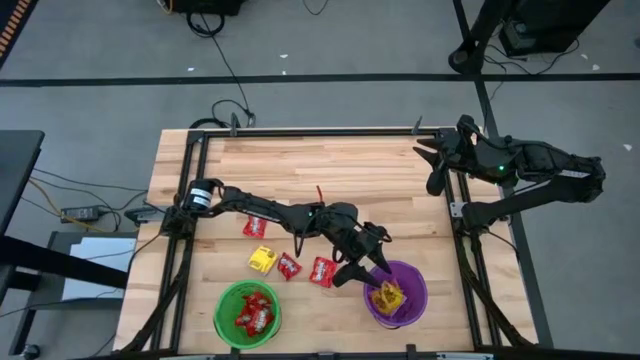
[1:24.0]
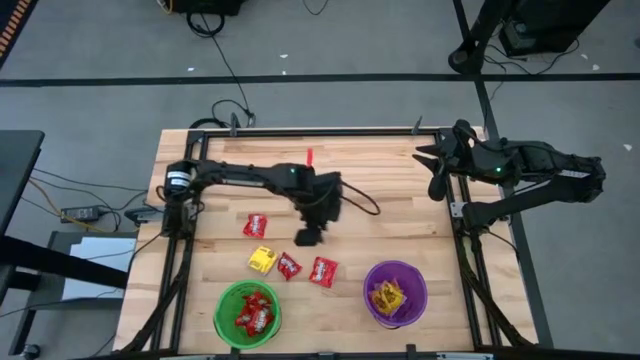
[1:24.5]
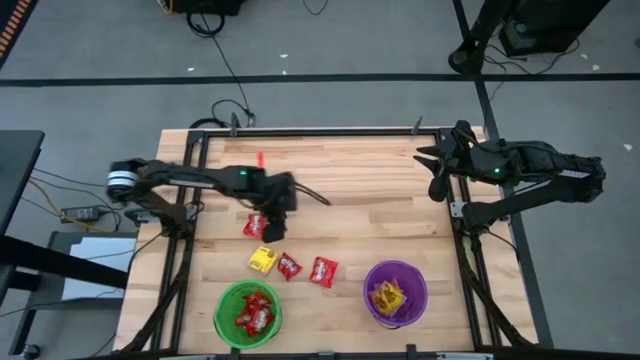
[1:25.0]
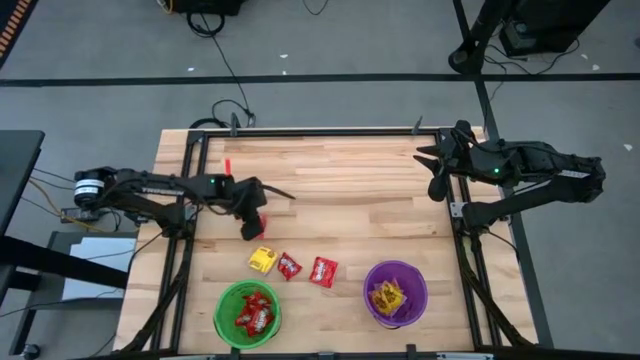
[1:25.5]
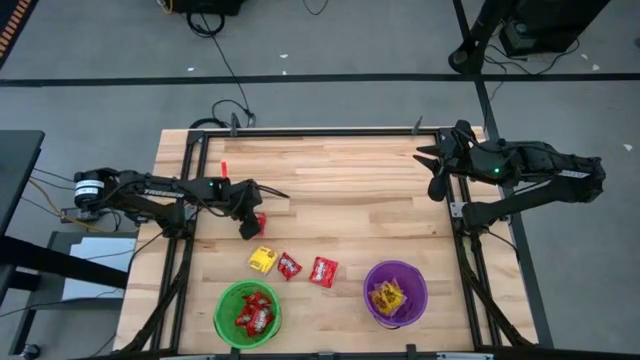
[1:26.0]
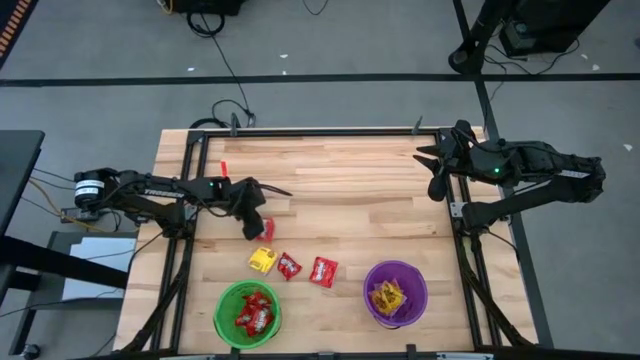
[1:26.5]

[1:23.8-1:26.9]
Task: Sort candy by brand, put in halloween buckets
Put the red candy into the green bucket

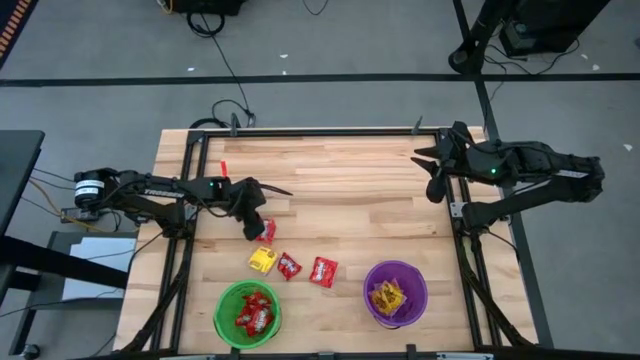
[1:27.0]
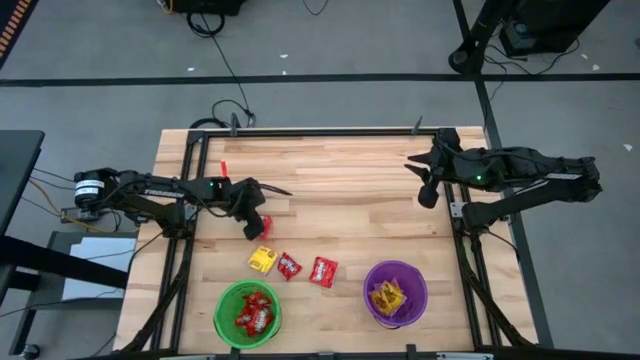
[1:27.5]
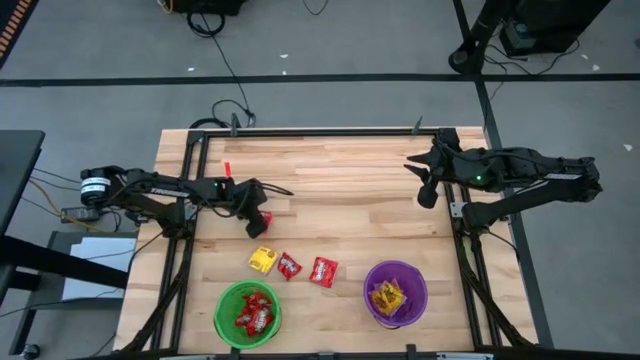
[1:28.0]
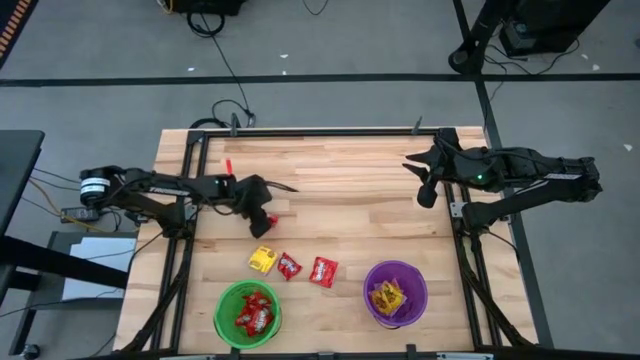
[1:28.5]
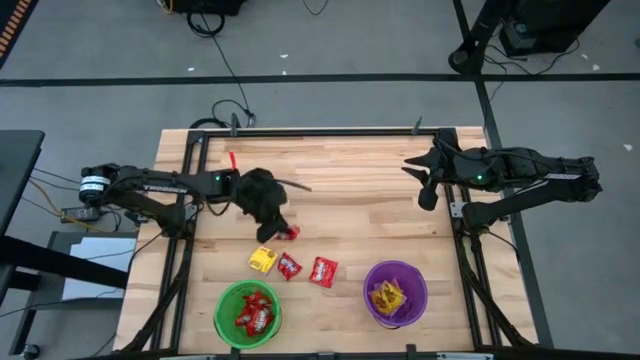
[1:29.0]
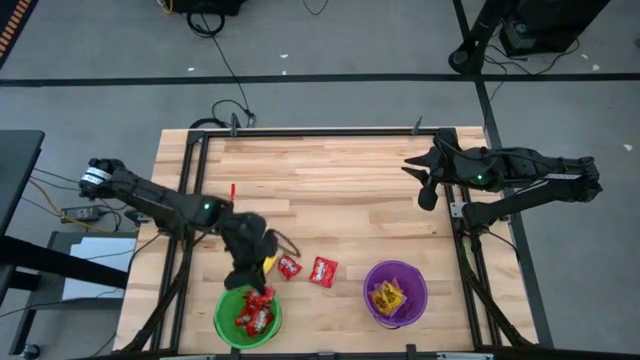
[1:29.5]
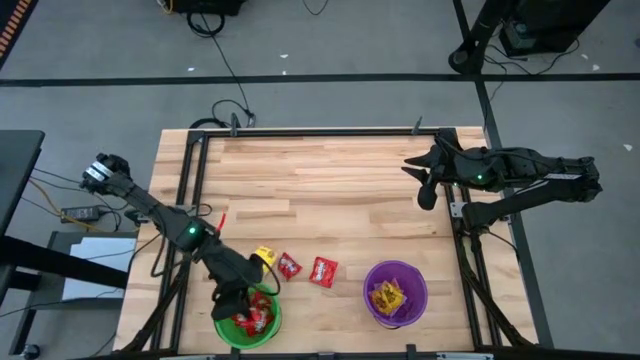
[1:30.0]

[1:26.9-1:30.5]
Put the red candy into the green bucket

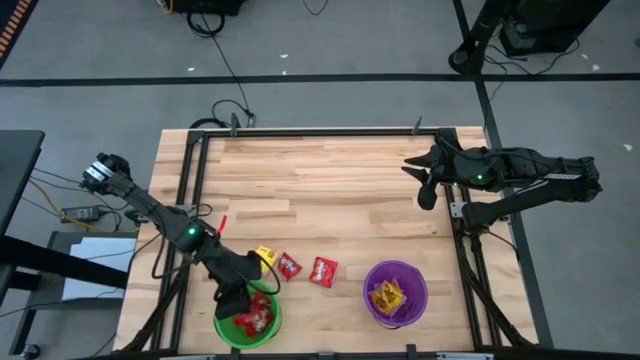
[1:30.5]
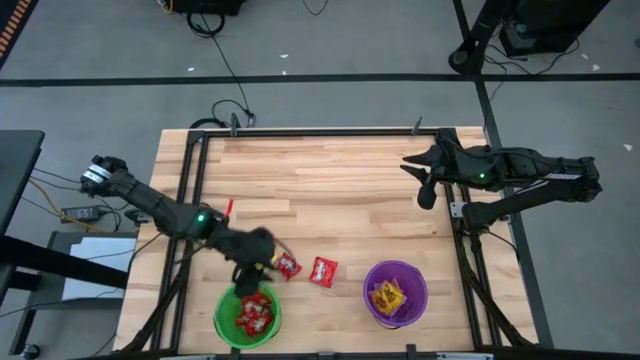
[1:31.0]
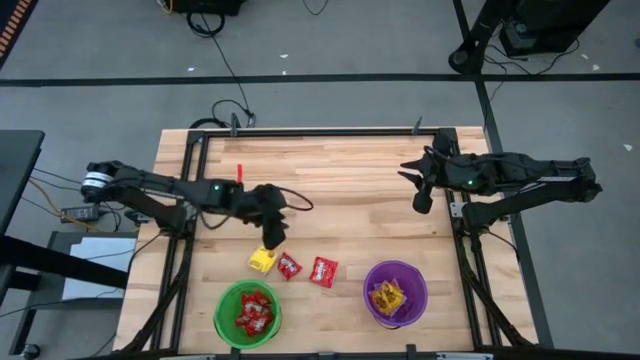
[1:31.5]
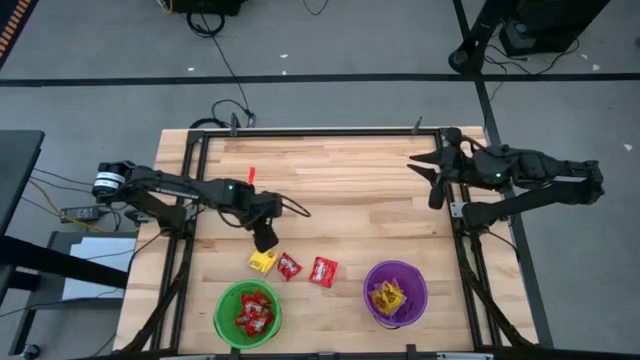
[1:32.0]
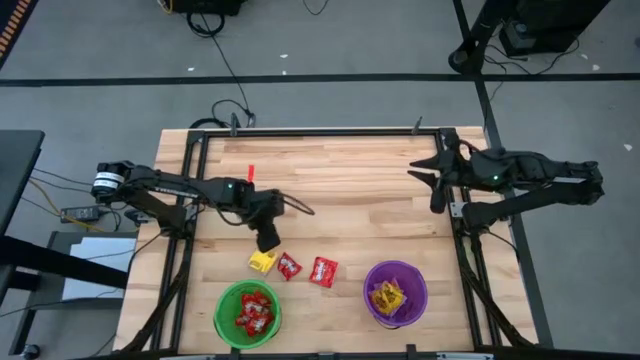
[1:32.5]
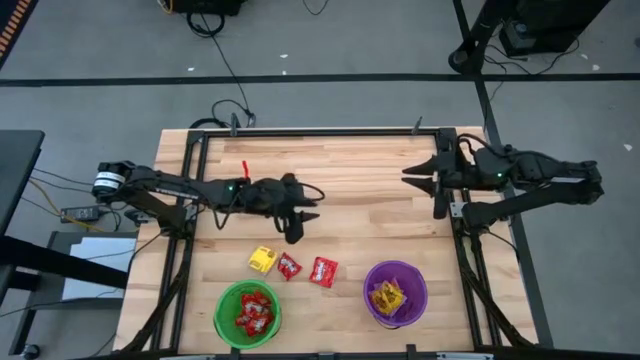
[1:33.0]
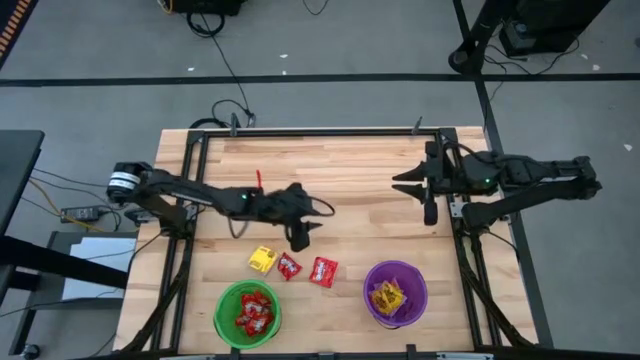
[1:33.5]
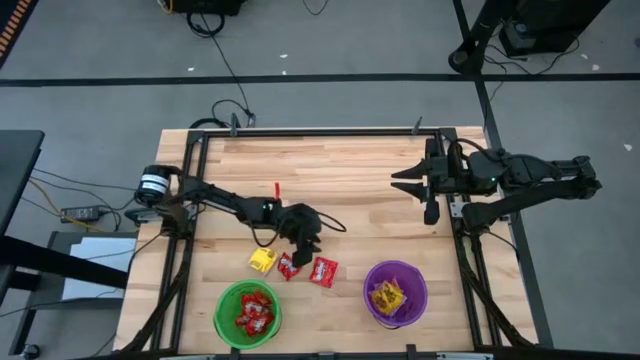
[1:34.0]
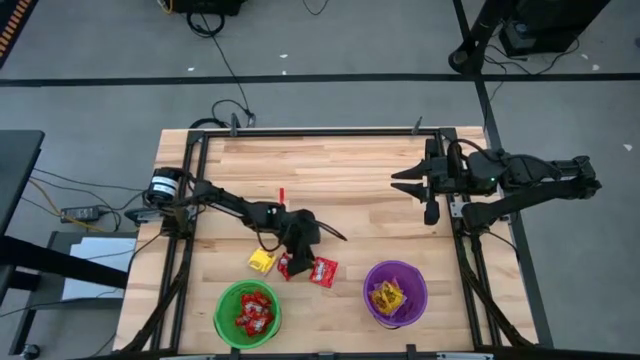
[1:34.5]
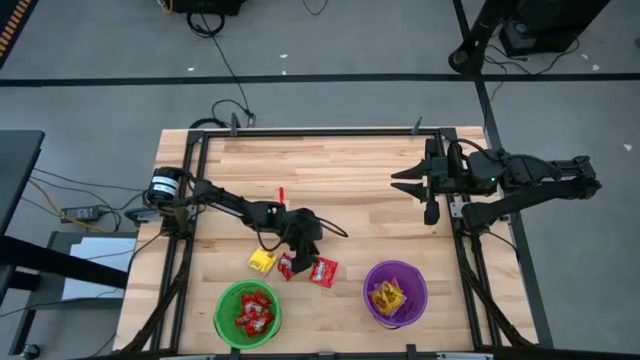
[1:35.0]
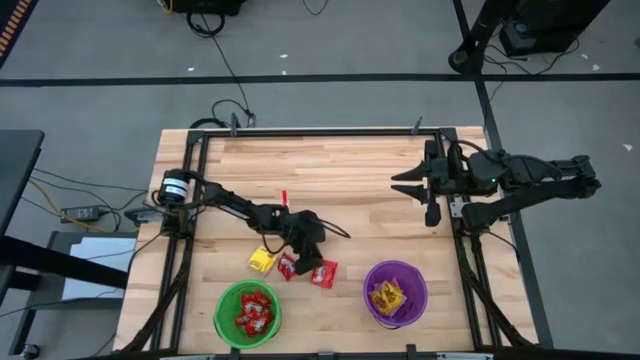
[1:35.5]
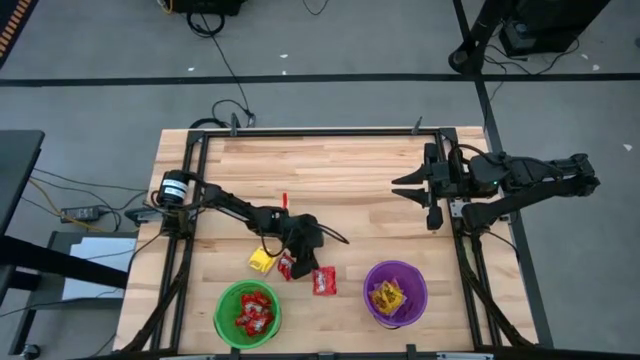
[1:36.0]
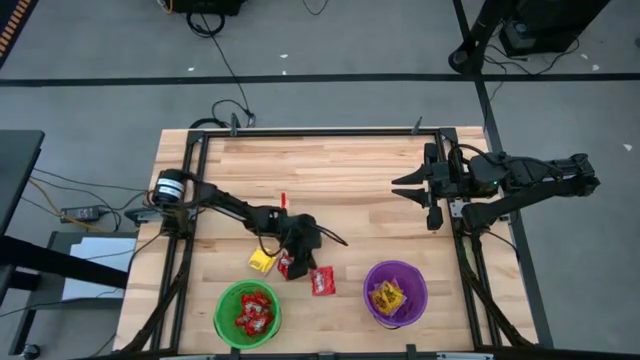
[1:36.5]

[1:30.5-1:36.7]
Put the red candy into the green bucket

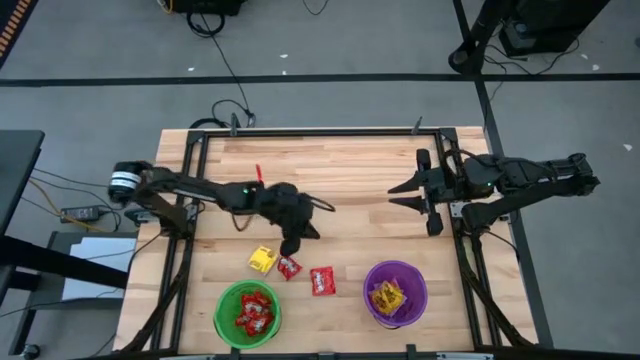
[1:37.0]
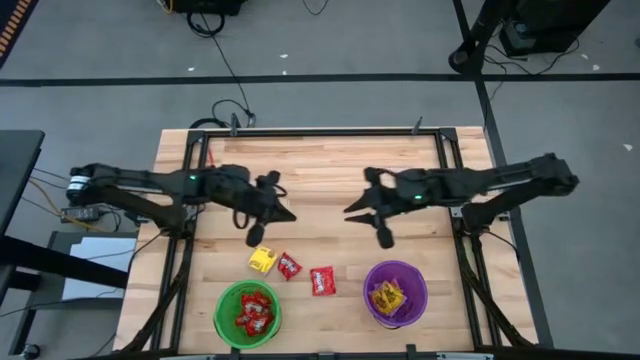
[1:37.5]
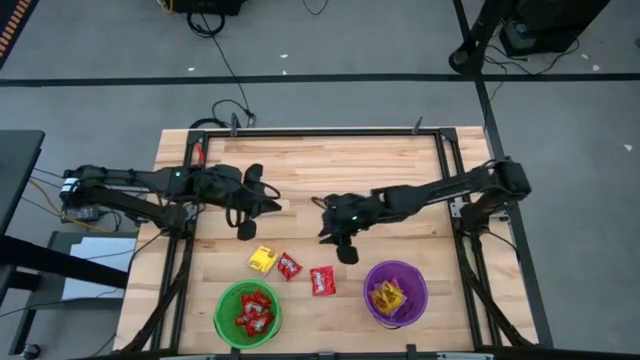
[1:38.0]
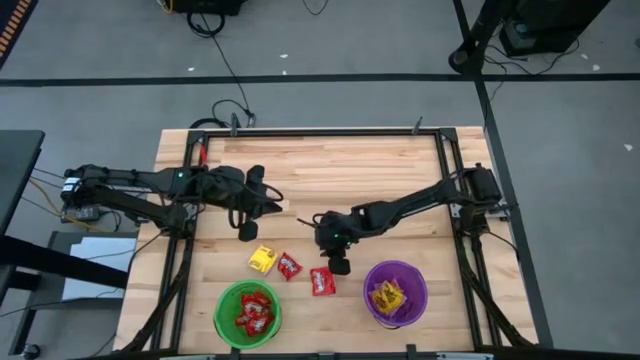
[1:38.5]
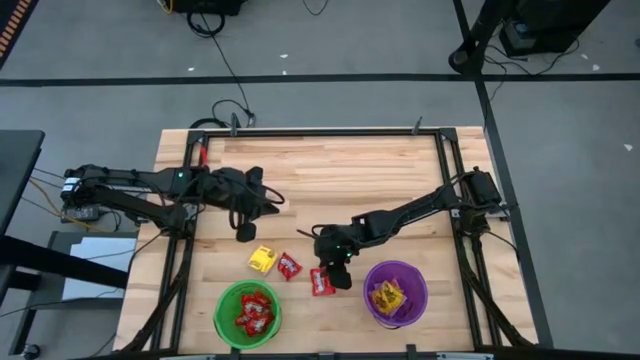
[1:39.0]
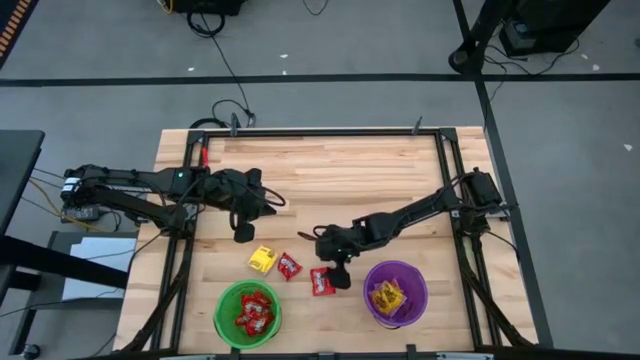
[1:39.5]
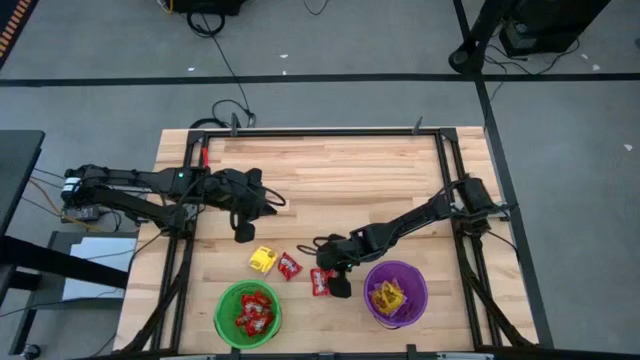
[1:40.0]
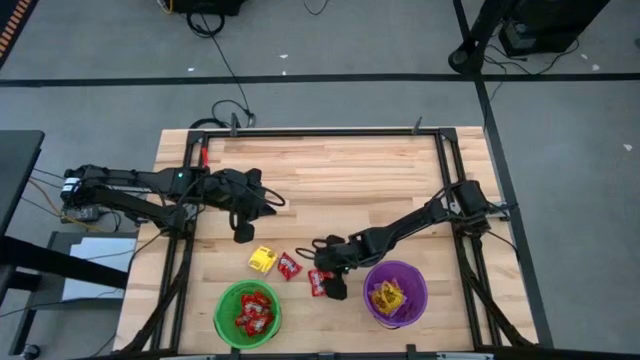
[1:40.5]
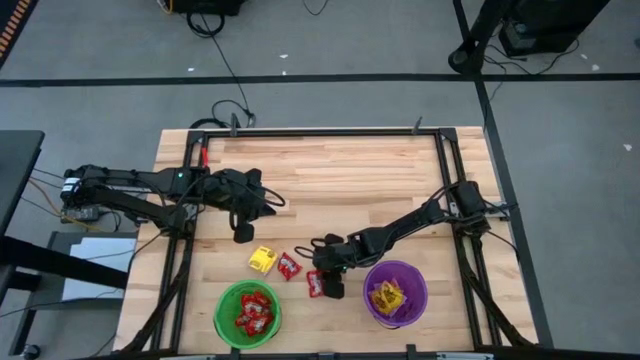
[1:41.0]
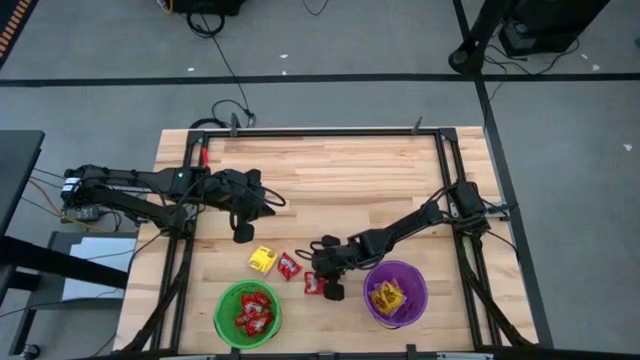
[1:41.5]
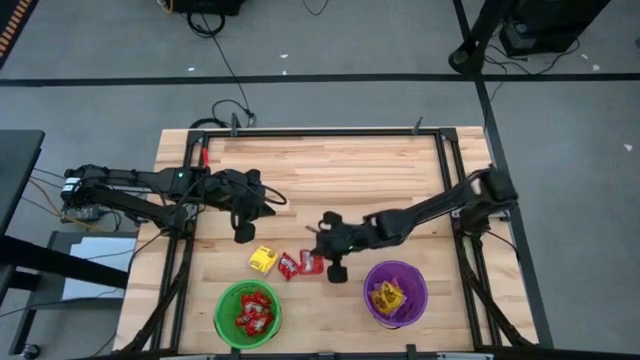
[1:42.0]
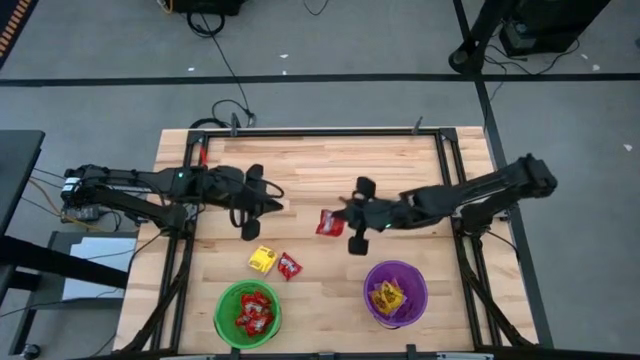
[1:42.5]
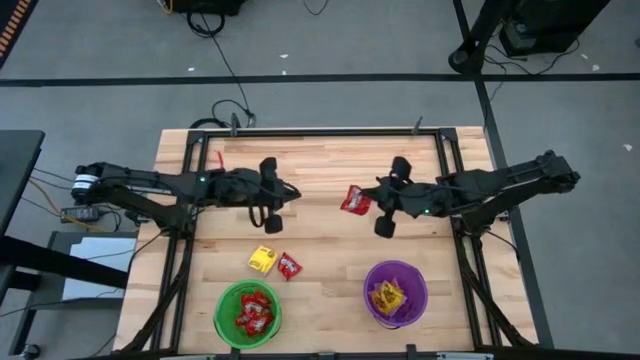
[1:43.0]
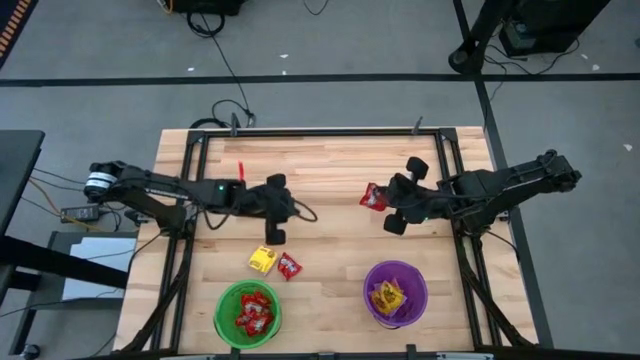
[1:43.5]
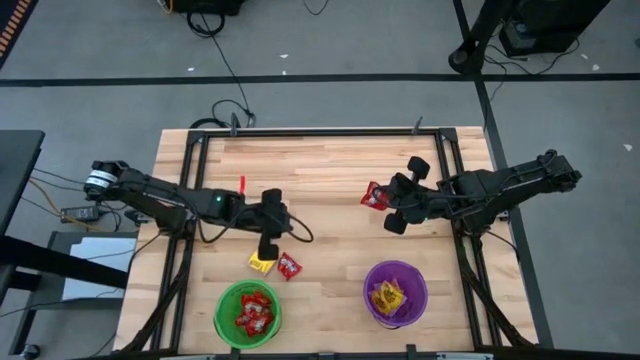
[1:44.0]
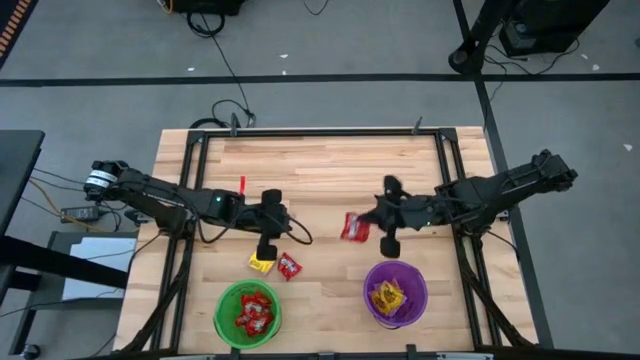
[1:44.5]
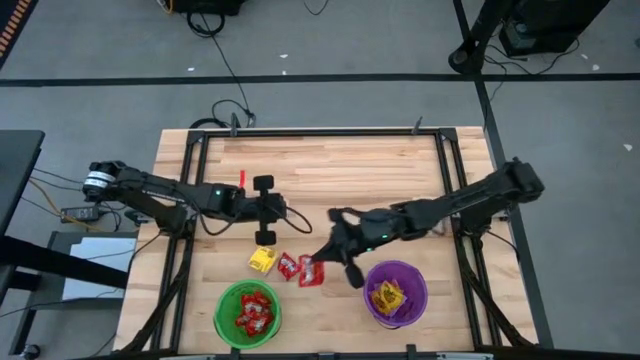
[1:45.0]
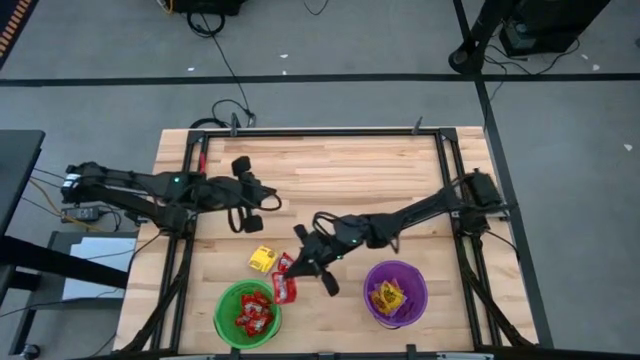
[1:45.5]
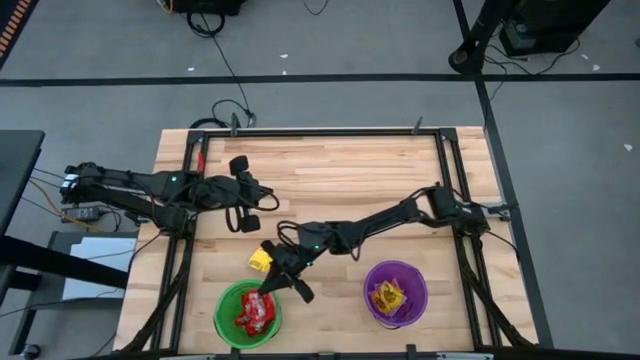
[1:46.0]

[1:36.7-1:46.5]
Put the red candy into the green bucket
